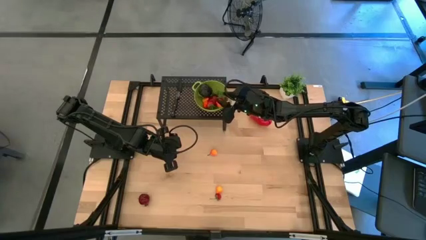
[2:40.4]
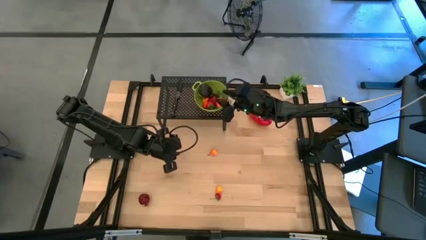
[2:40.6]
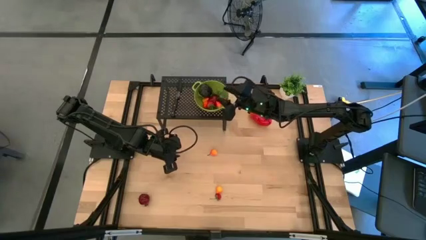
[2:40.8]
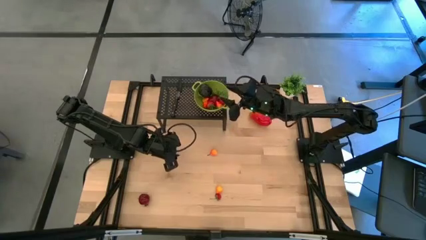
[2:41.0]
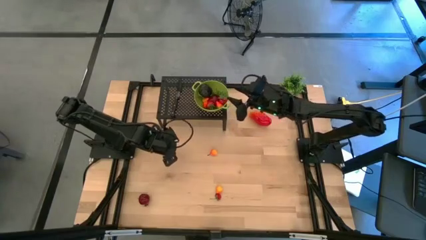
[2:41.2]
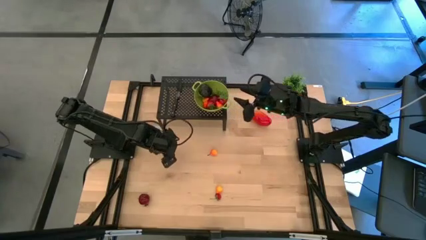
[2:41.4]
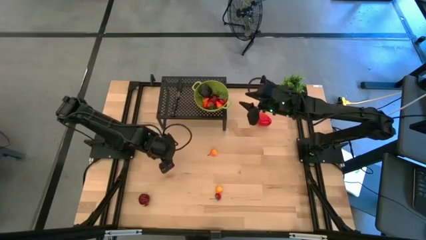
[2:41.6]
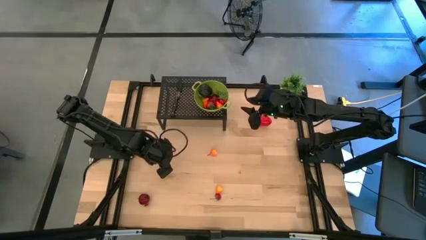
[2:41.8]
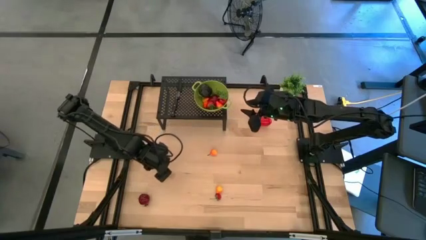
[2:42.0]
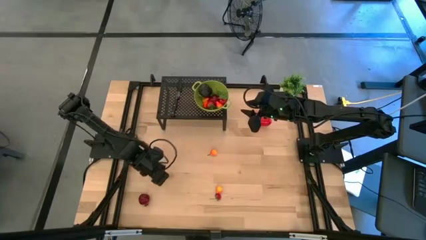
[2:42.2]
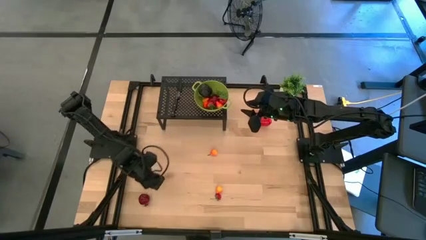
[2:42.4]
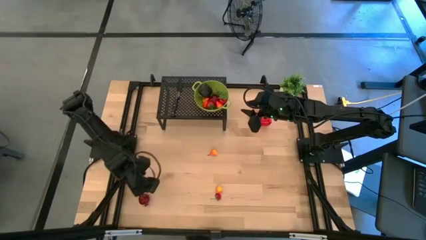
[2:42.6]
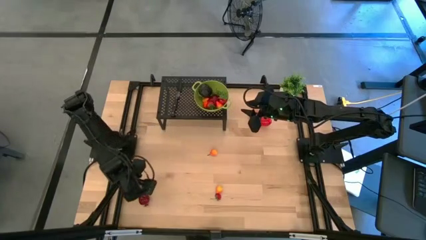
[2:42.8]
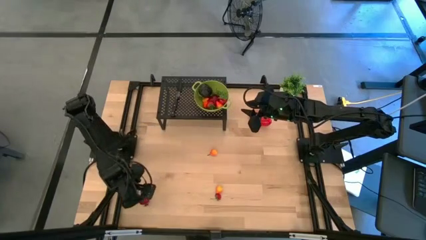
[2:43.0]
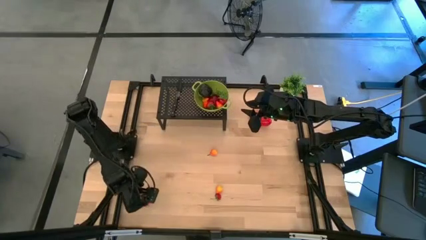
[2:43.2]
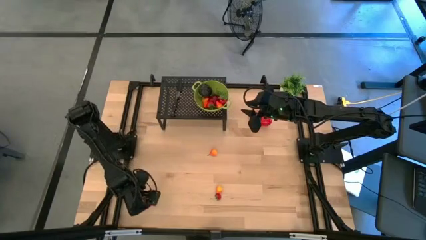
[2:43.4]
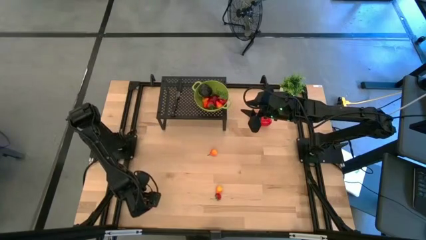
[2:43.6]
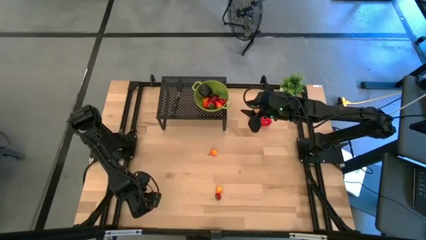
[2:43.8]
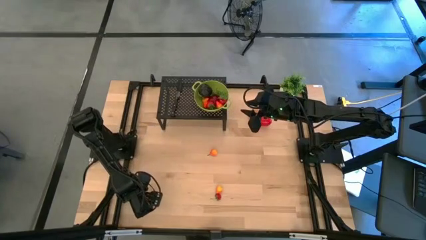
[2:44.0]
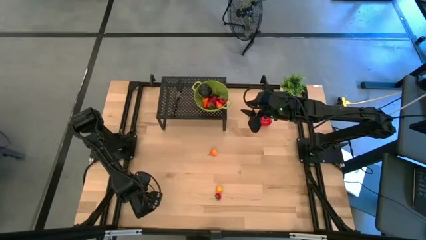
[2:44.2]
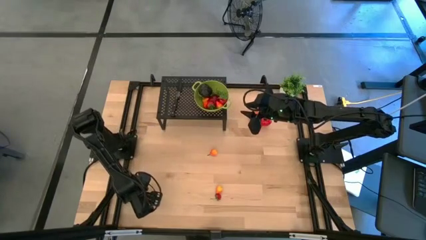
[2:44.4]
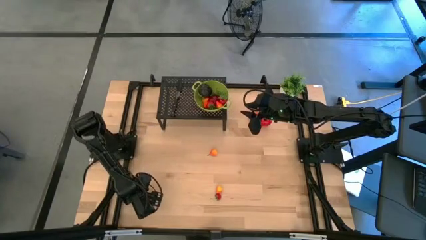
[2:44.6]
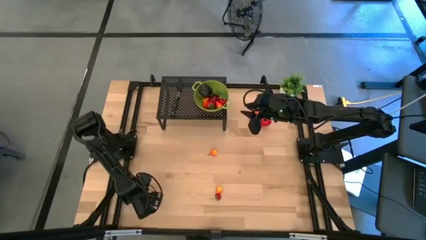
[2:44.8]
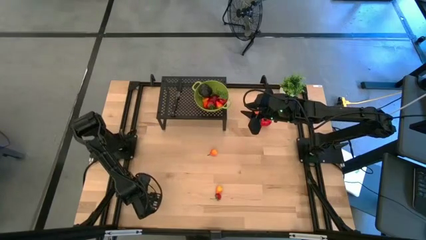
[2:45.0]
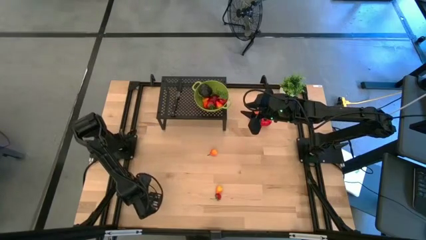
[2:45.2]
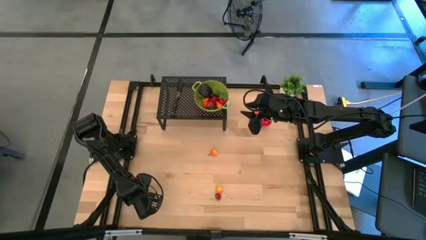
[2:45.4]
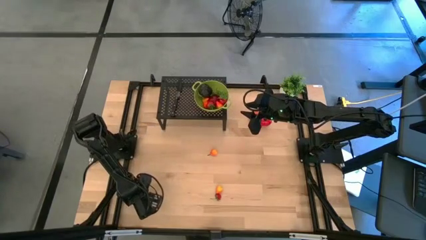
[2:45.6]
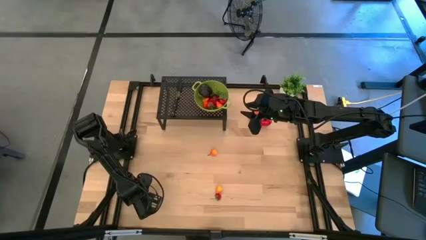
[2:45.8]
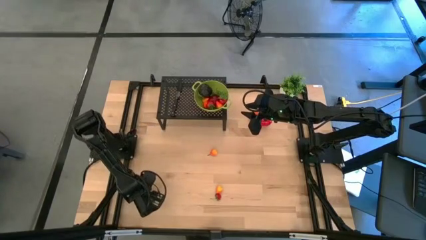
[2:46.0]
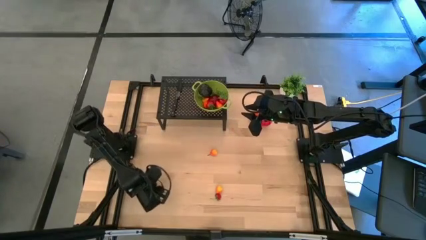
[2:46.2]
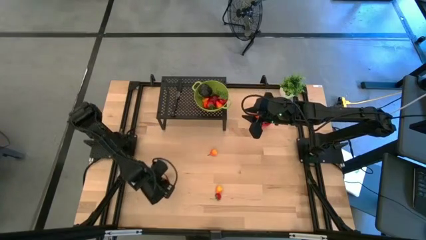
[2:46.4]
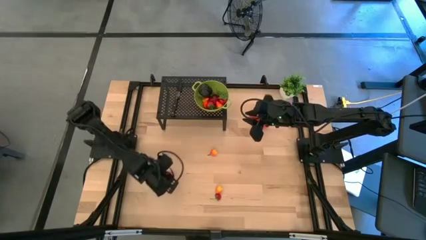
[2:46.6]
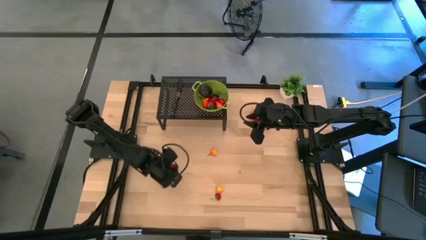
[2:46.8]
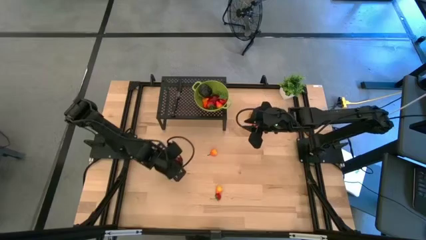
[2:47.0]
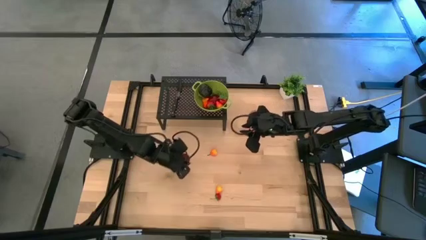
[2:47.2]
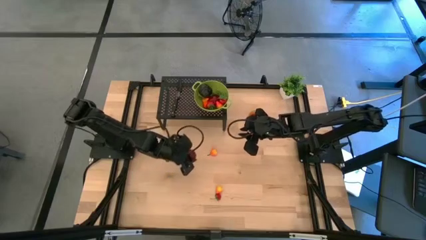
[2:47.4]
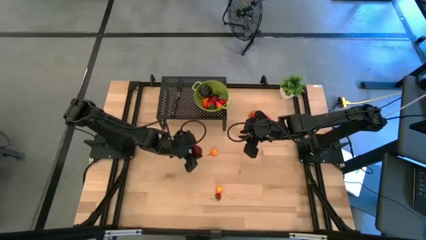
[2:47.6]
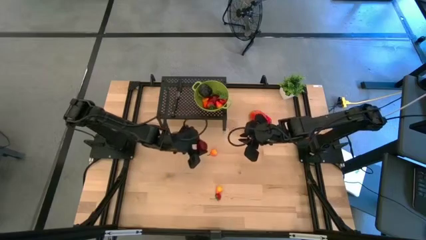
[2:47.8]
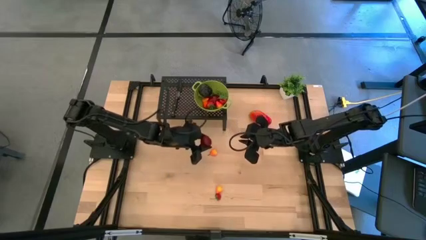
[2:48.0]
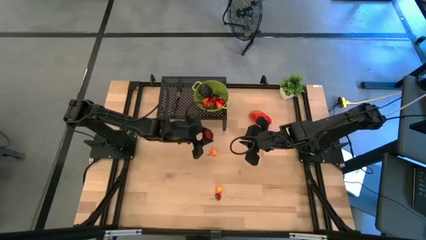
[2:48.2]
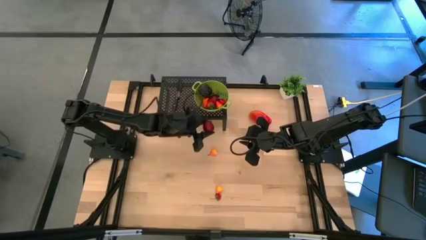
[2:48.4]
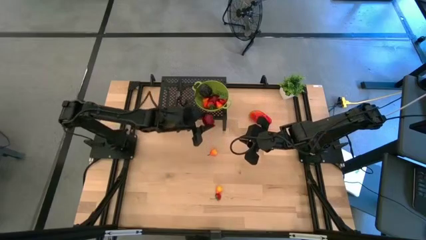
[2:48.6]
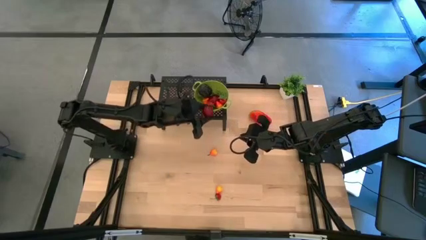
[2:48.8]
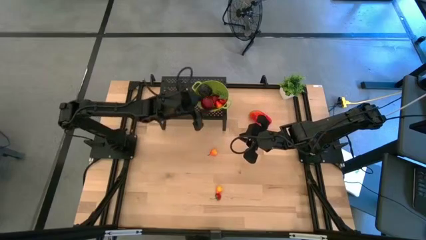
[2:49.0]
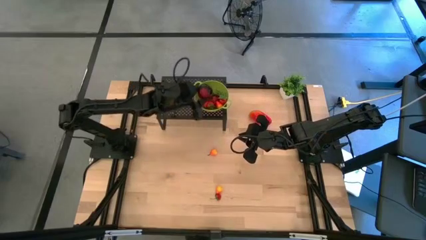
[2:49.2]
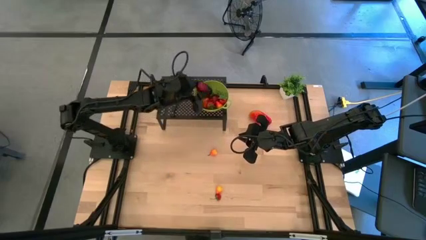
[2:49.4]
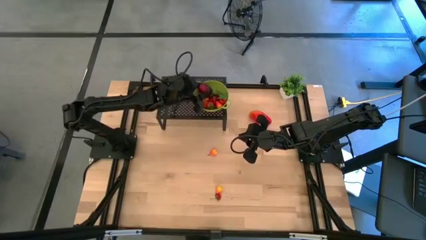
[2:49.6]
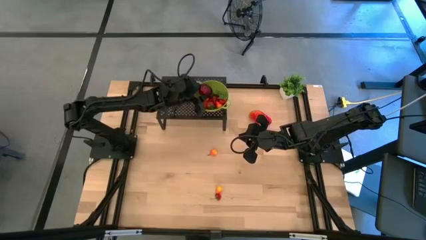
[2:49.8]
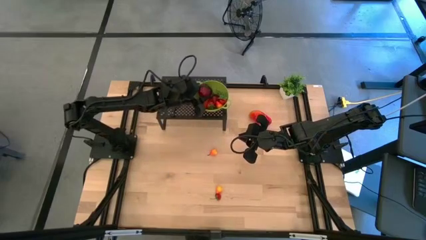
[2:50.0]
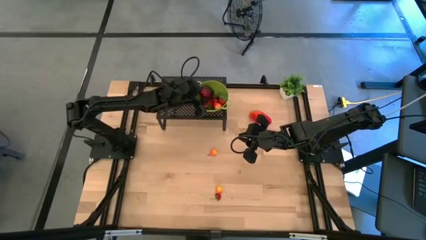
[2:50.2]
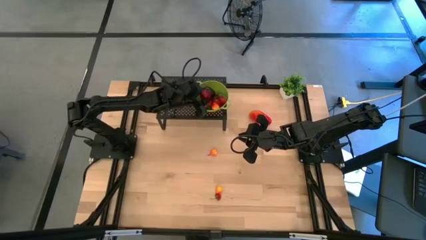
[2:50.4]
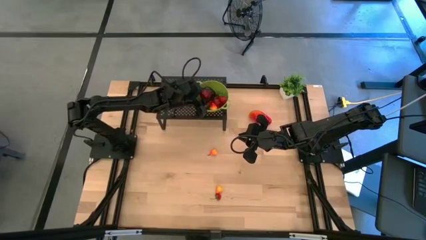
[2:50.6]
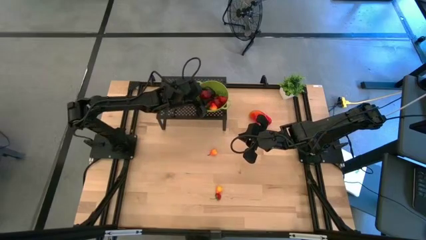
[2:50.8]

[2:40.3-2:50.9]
Task: Pick & Place Fruit
Put the pomegranate into the green strainer bowl on the shelf

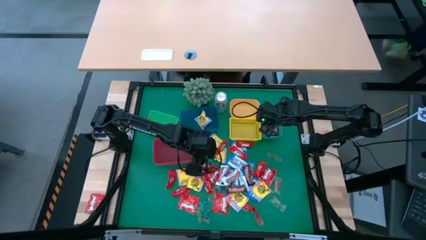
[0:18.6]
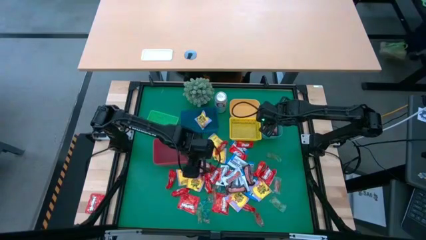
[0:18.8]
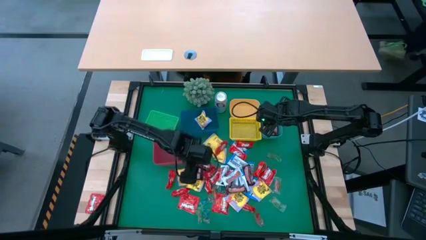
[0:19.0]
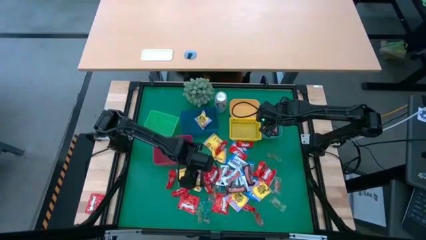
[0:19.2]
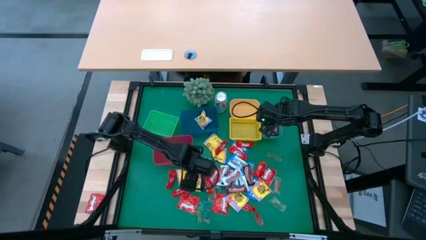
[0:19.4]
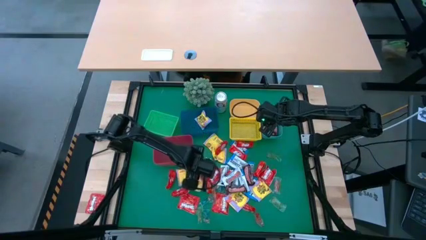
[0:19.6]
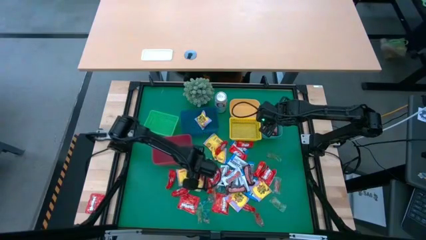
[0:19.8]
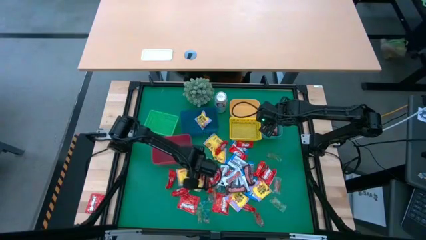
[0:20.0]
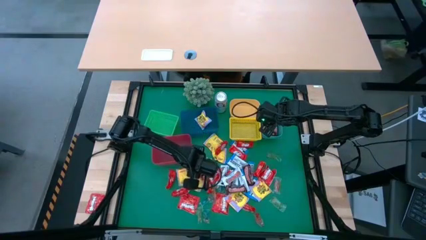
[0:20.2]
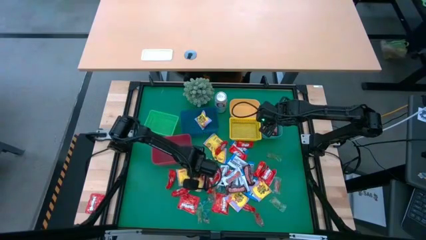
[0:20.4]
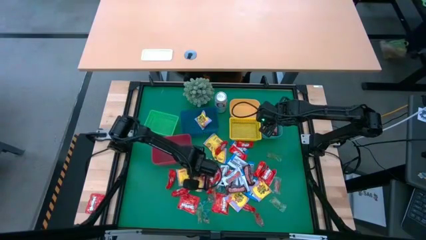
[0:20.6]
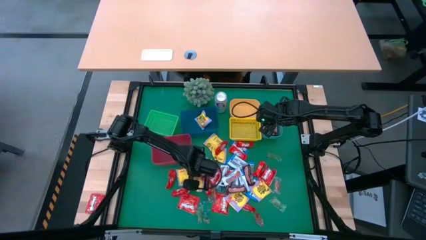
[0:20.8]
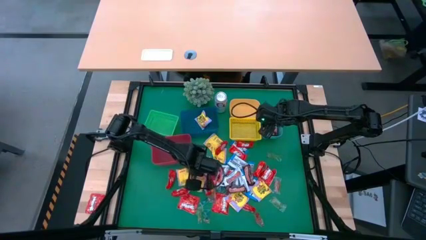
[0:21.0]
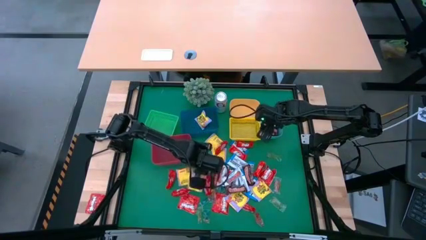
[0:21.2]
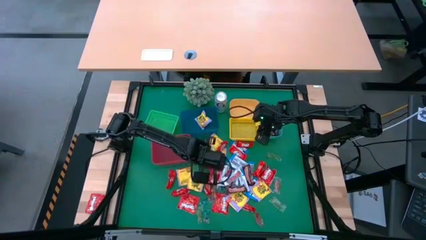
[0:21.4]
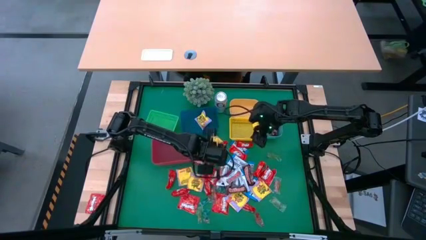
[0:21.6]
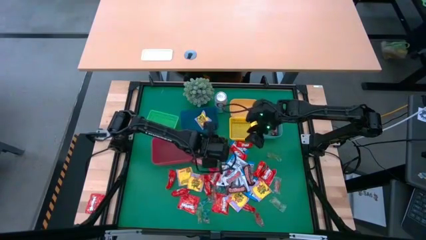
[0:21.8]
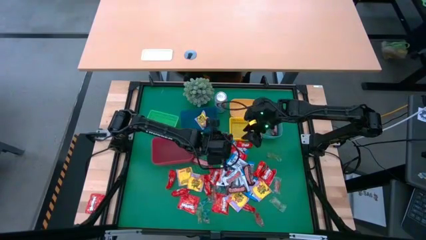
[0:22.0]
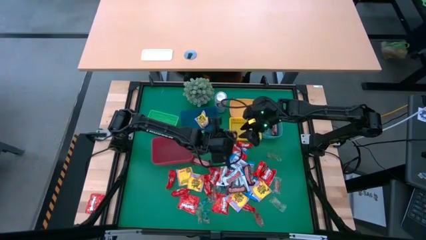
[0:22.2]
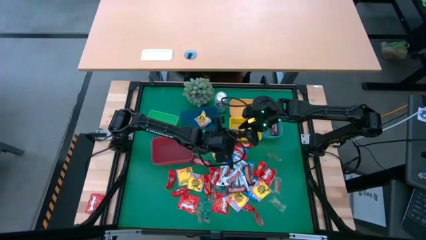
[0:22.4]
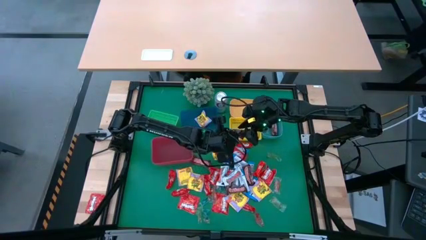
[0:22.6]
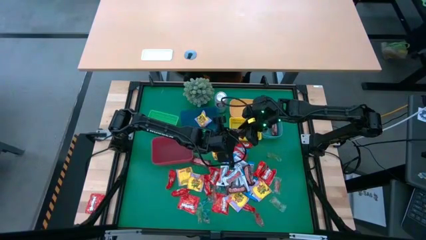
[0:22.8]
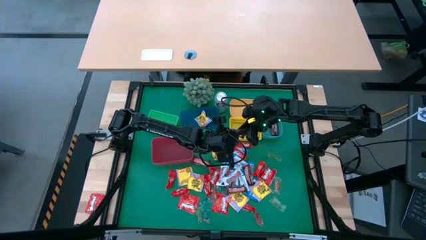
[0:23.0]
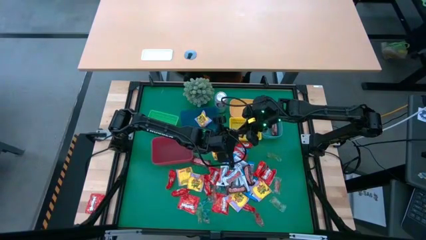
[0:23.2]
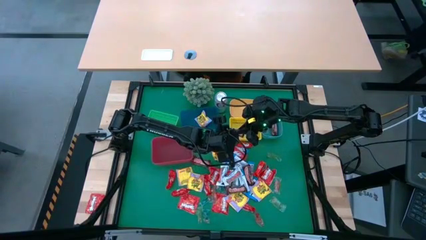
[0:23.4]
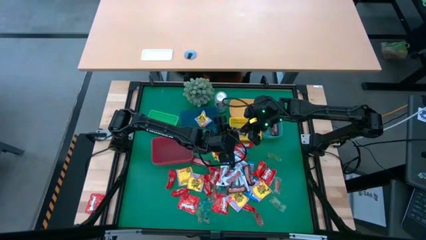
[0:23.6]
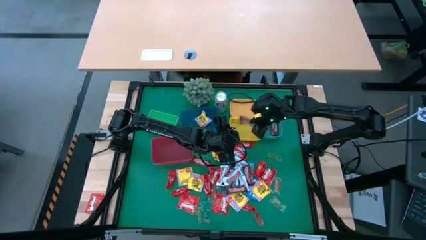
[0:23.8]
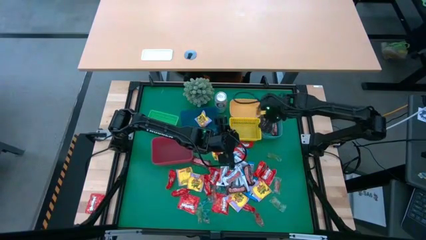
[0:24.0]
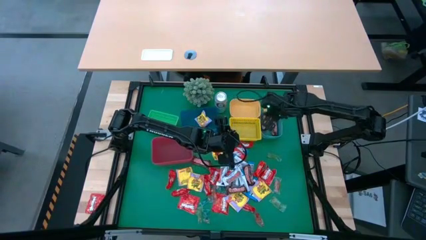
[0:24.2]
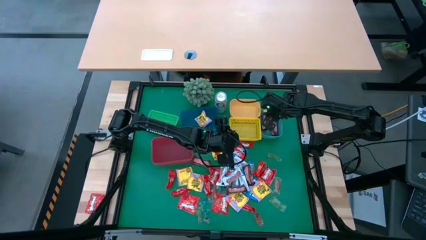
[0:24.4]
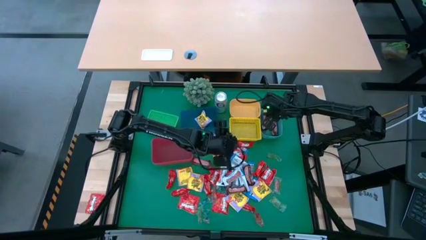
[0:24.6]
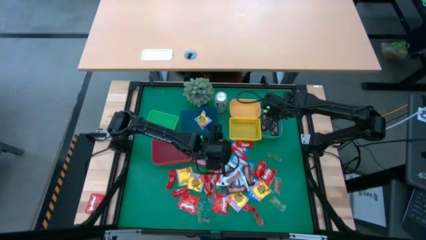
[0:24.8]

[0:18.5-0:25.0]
Task: Sort candy
Put the brown candy into the green bin
